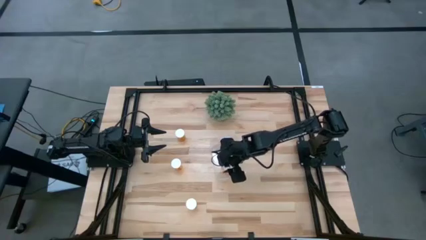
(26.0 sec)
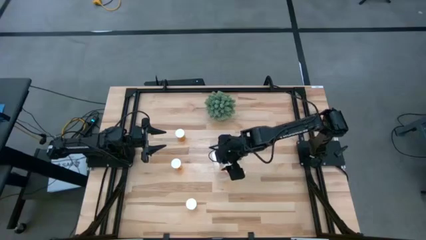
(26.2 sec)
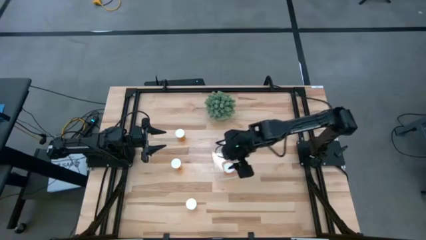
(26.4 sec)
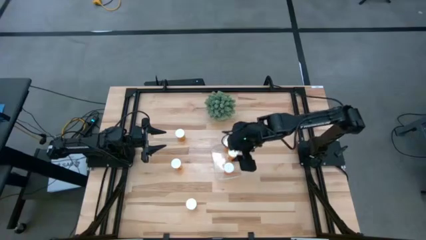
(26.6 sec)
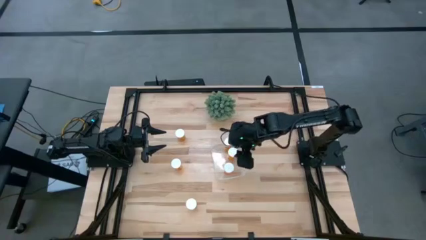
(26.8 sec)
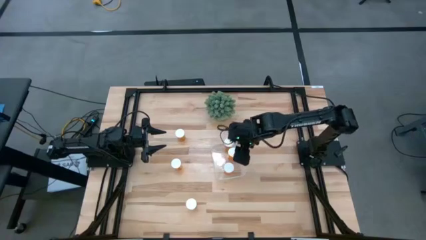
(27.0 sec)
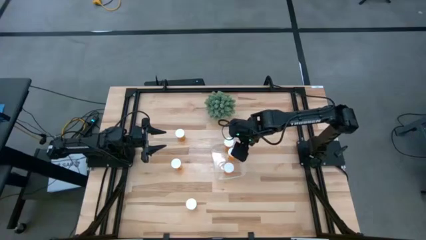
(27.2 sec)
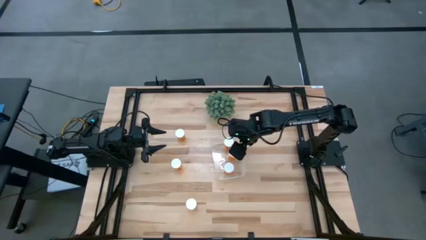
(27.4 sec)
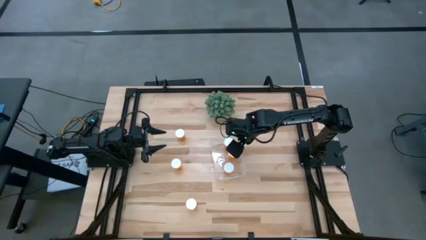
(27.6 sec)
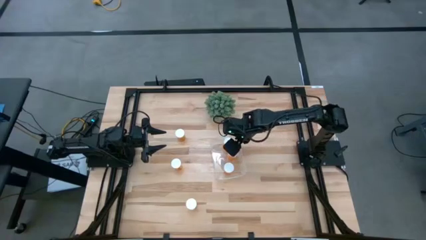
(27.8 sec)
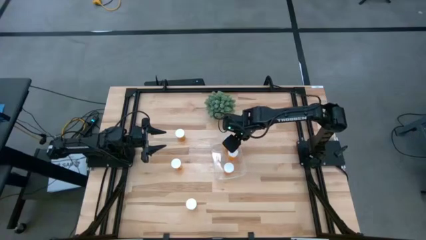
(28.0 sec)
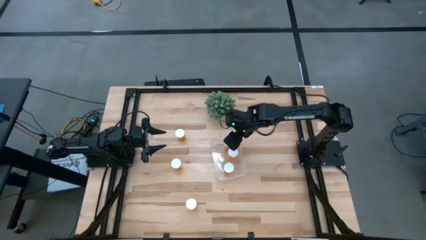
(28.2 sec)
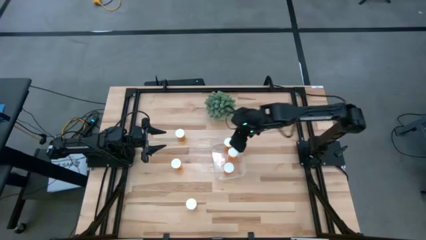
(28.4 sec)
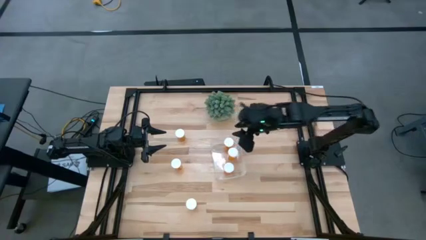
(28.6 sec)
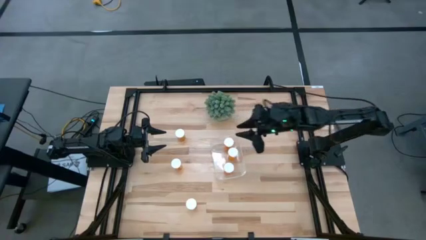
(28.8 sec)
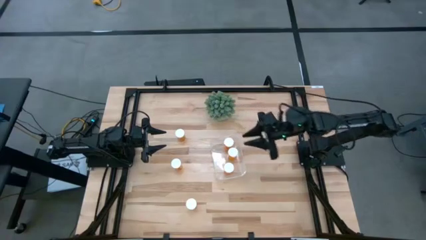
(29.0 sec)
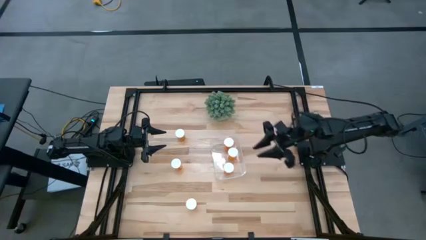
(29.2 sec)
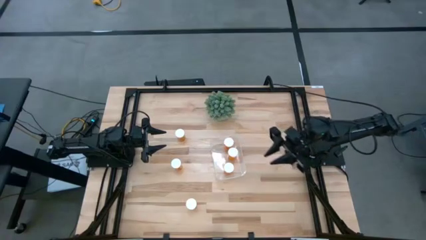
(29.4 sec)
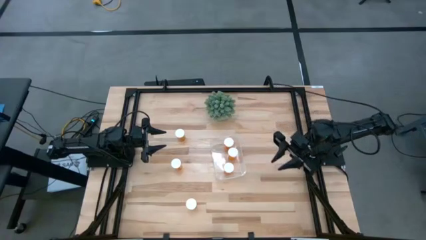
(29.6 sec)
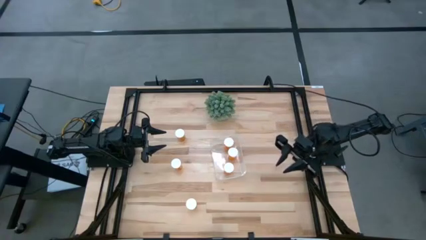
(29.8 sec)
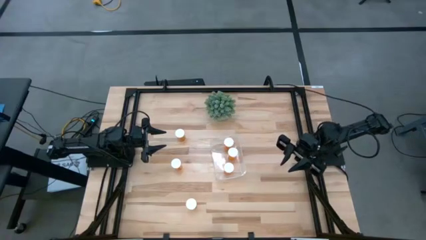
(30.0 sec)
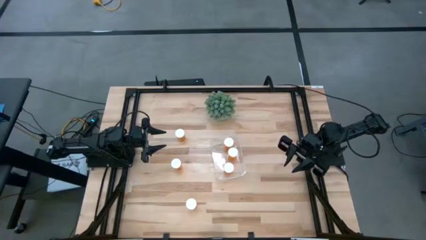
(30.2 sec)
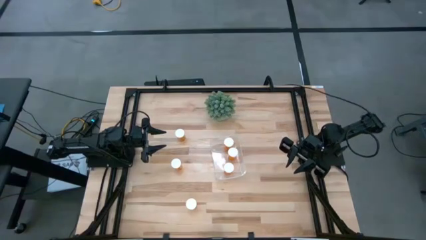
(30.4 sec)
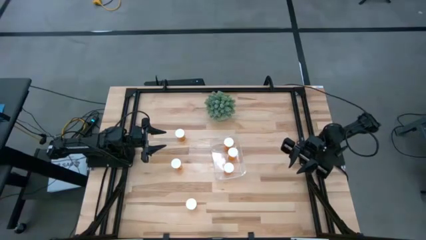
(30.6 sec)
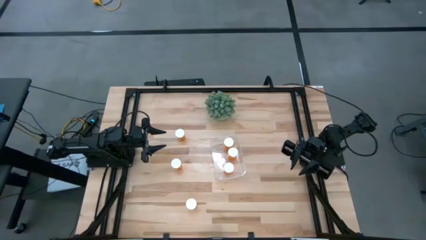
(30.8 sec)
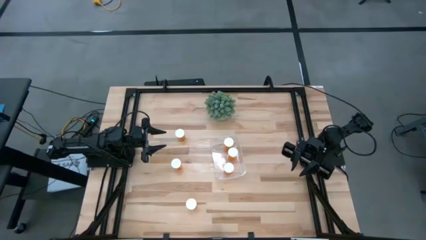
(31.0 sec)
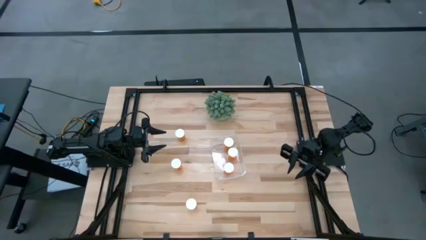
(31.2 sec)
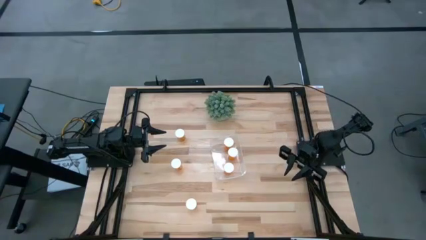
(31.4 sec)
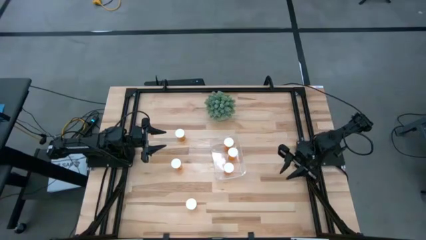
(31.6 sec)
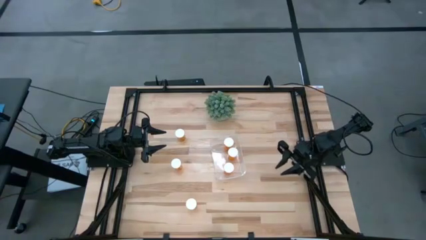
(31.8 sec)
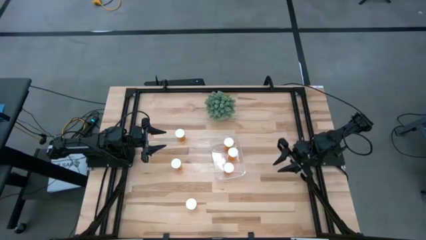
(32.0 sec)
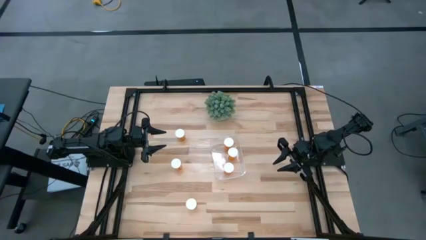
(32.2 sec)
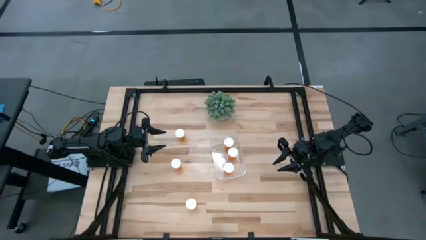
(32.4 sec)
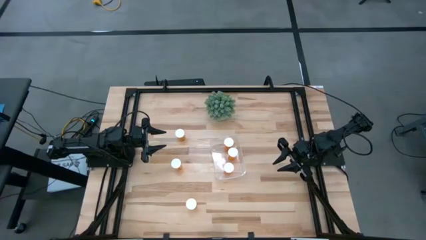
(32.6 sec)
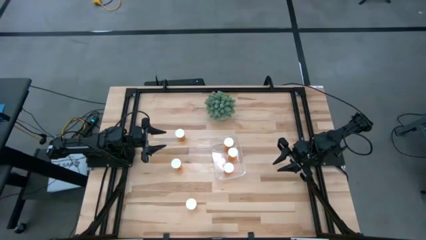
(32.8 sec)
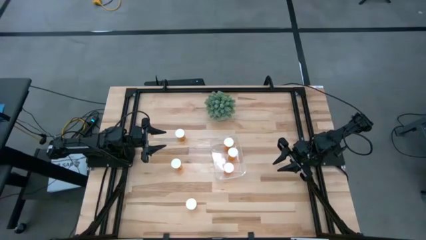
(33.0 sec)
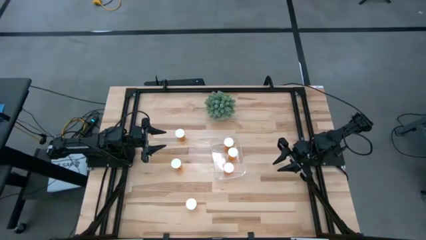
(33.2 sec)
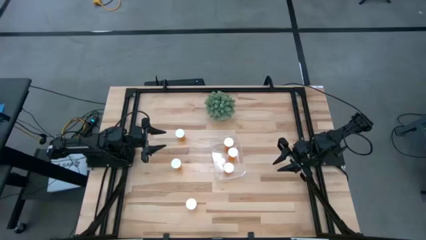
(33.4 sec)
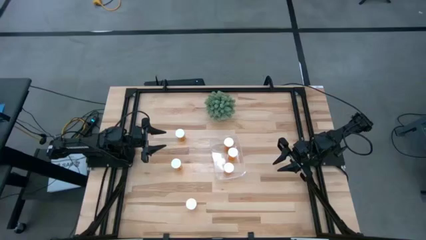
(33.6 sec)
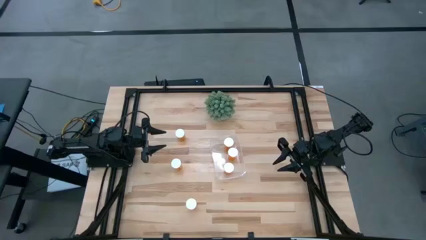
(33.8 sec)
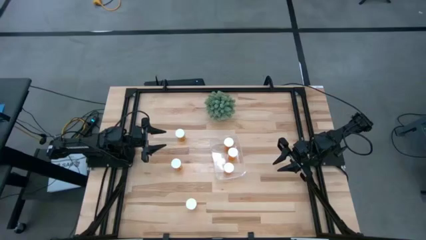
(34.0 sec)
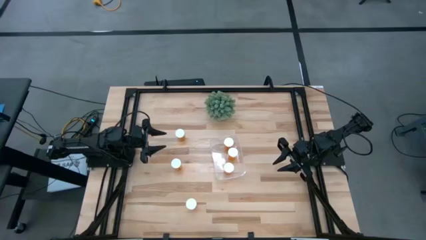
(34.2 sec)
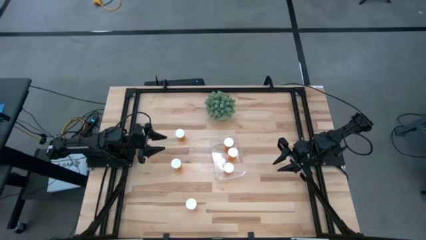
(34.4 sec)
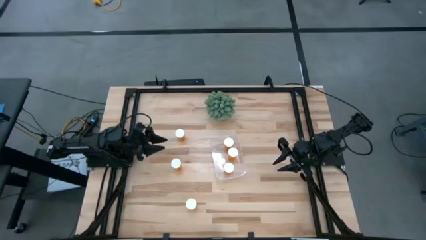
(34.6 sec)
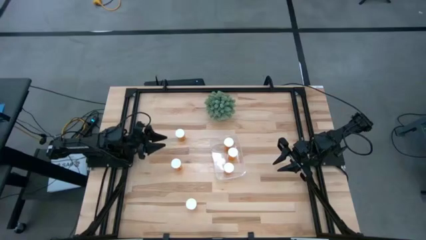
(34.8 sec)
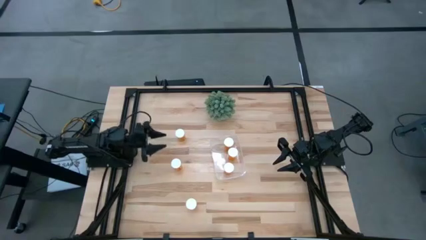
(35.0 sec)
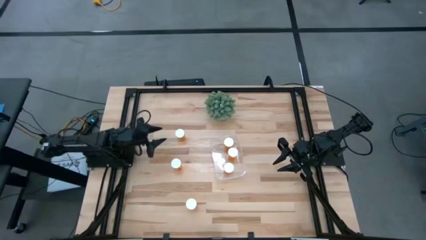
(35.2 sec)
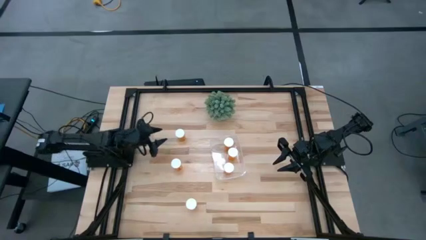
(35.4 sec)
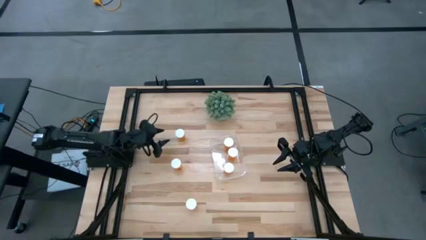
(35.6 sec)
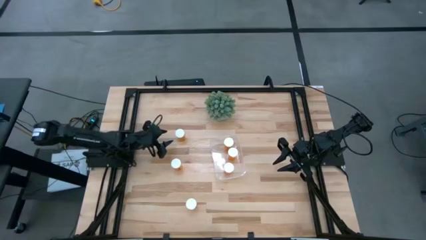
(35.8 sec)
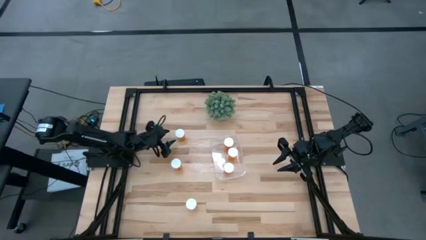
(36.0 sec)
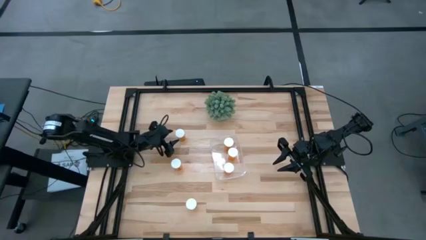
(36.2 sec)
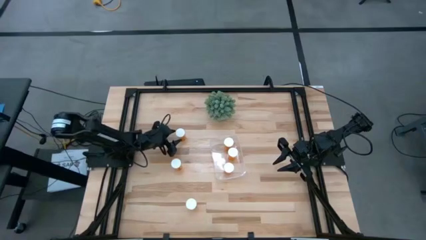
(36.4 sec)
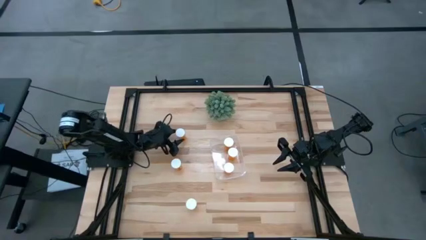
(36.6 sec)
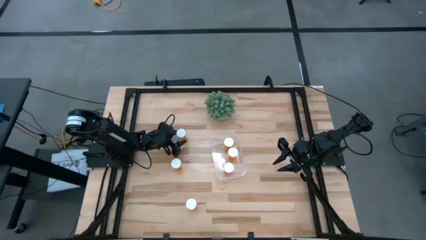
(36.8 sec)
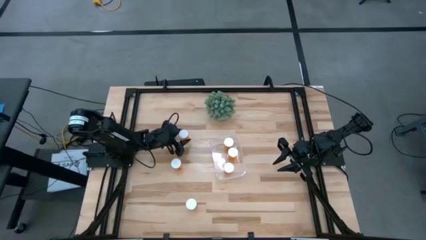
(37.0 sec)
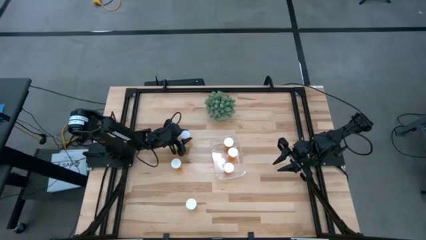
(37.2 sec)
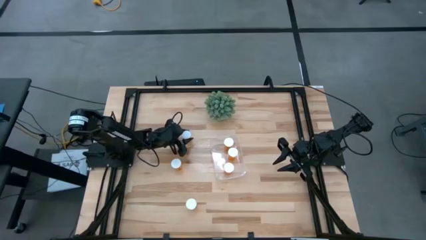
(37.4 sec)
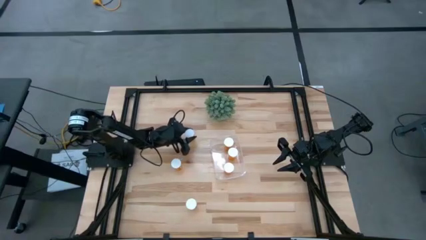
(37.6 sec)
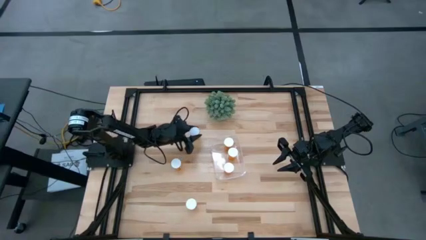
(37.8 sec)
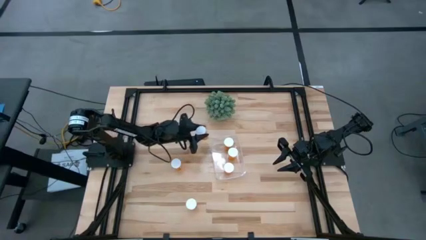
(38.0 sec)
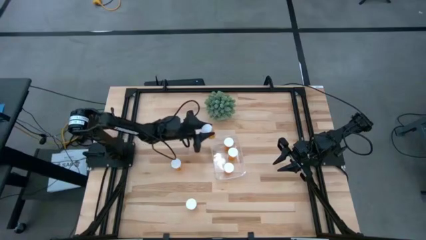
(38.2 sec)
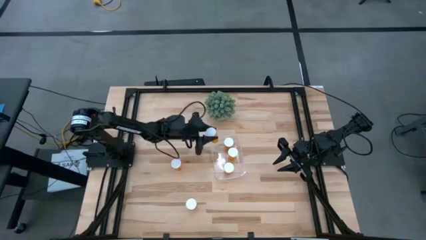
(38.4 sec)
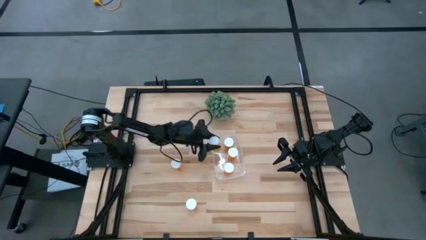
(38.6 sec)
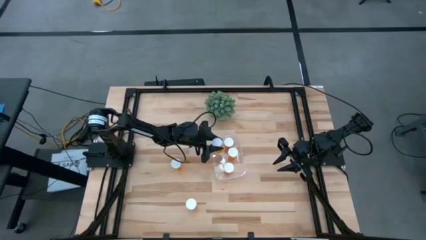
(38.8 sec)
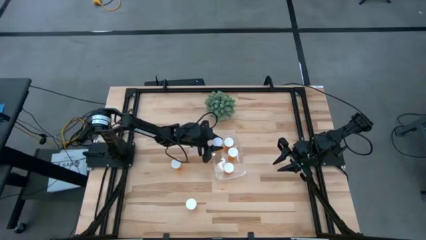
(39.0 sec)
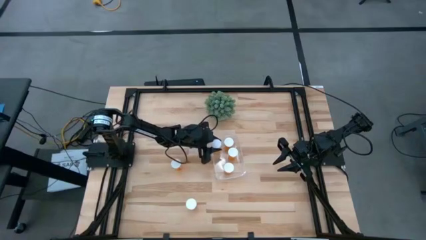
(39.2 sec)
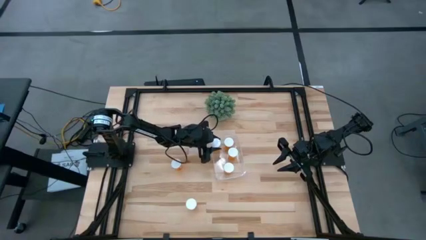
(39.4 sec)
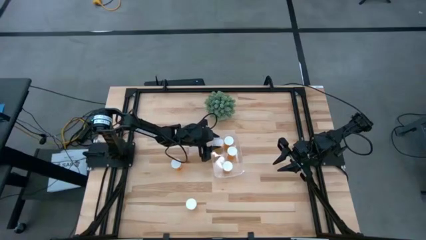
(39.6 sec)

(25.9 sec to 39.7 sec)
Task: Pick and place pill bottles into a basket
Put the orange pill bottle into the transparent bin

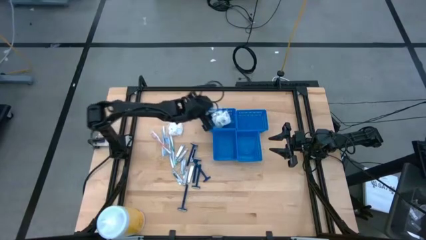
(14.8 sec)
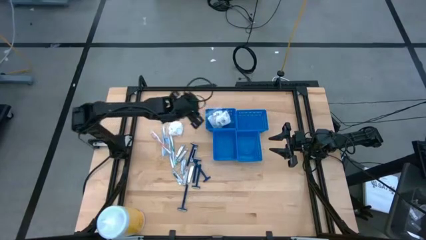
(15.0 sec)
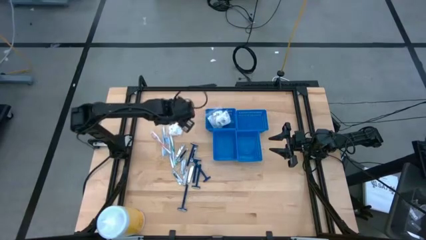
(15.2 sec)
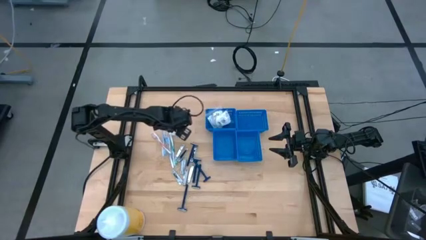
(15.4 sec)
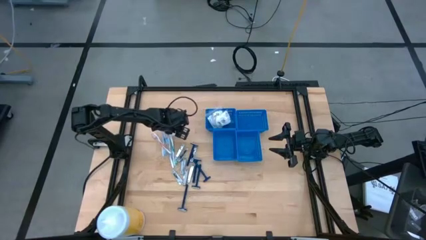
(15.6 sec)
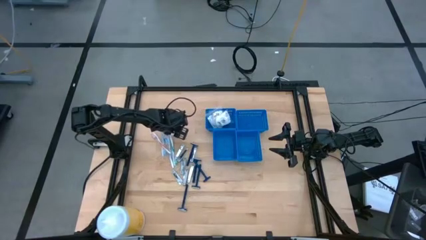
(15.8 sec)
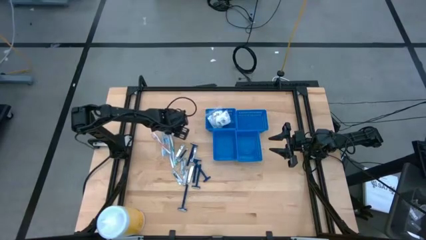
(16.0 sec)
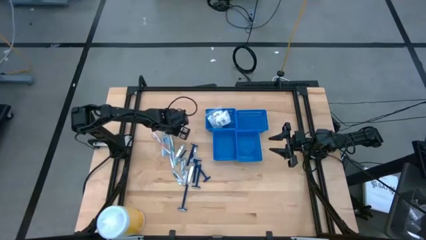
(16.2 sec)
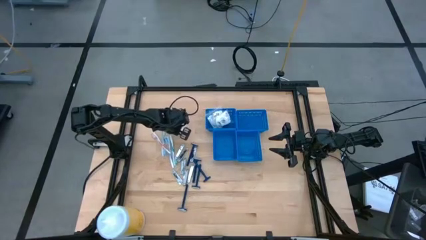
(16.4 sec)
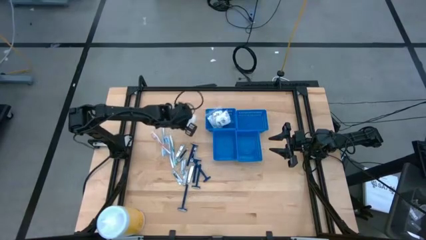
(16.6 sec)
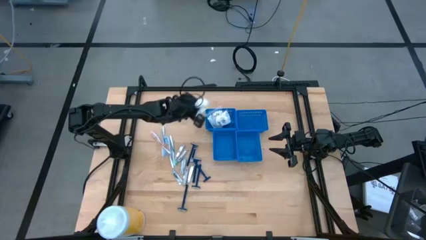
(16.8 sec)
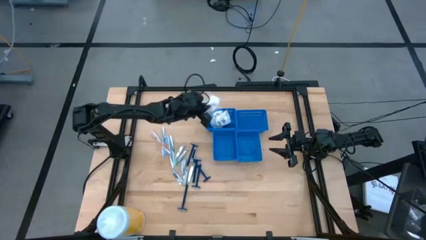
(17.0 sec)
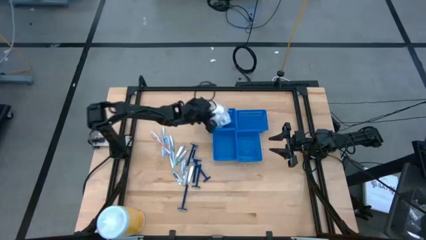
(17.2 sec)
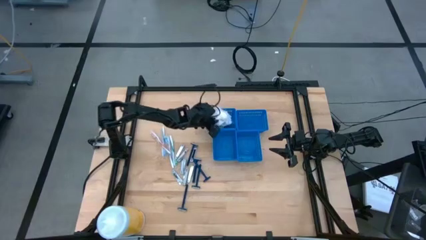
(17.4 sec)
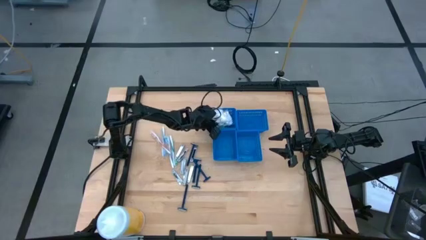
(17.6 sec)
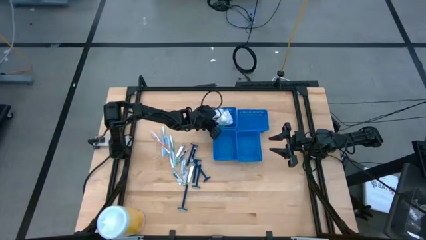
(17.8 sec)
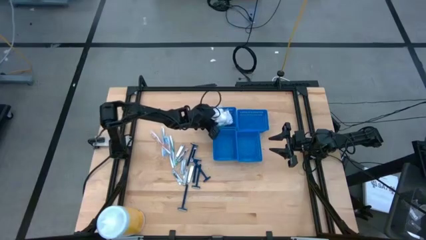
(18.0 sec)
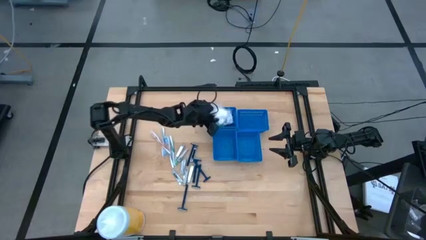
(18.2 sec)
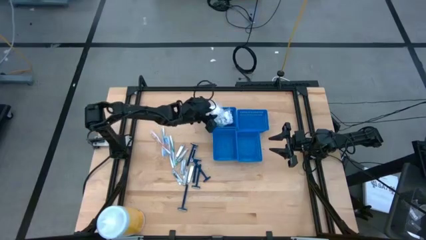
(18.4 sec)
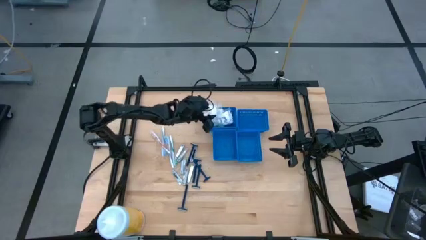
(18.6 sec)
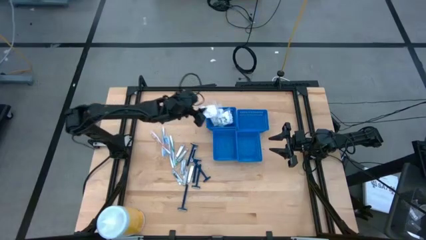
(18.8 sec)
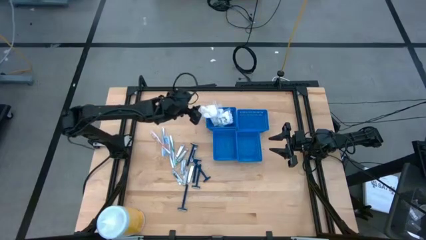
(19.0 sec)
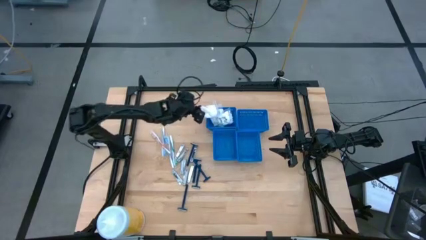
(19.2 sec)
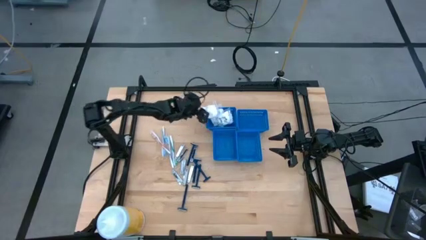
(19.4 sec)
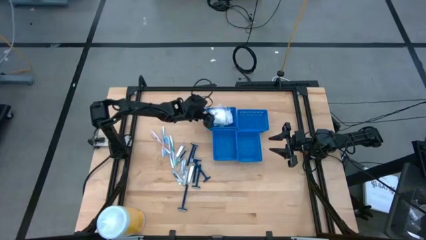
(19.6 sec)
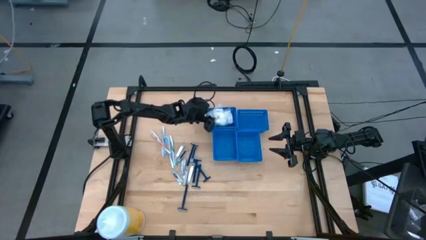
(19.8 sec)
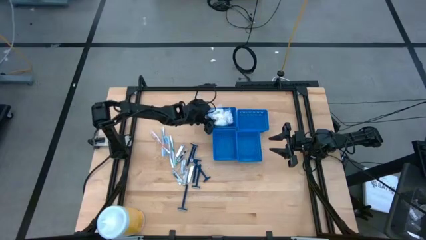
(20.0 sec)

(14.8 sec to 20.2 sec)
Task: Pick & Place Travel size toiletries
Put the transparent cotton pack into the top left blue basket
